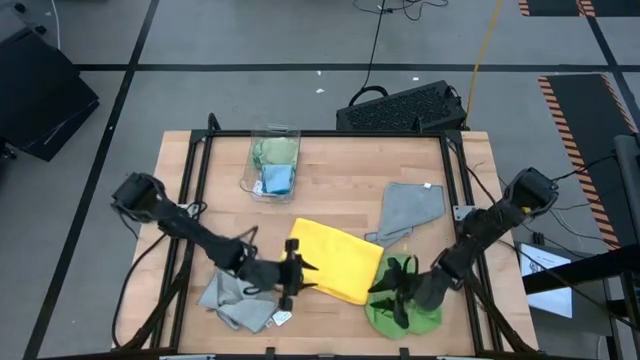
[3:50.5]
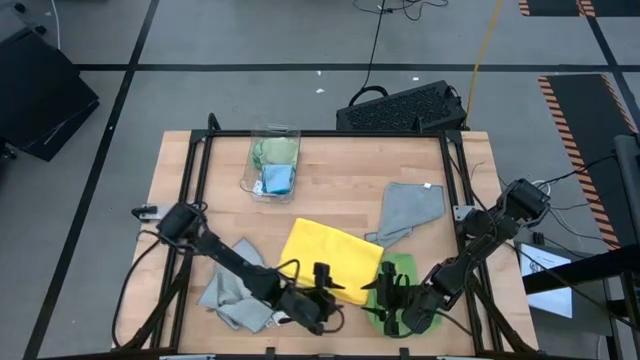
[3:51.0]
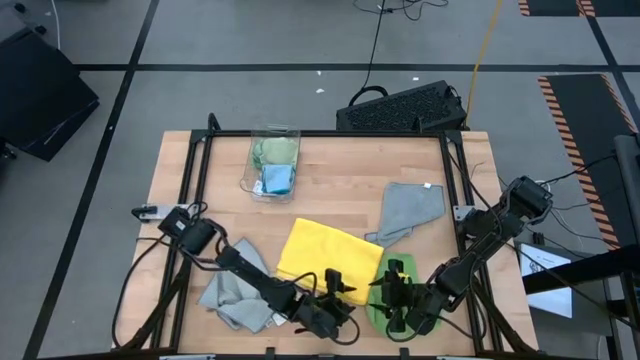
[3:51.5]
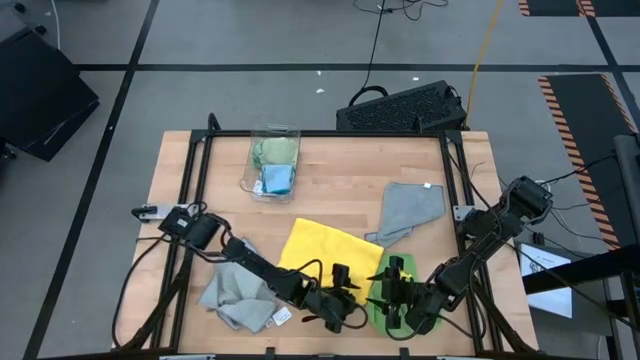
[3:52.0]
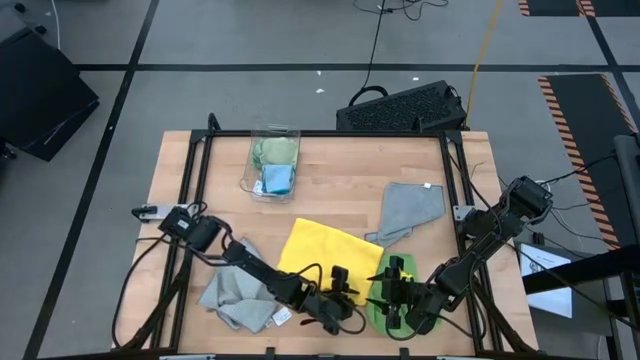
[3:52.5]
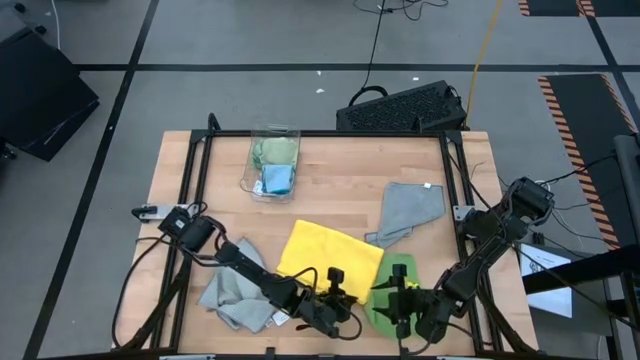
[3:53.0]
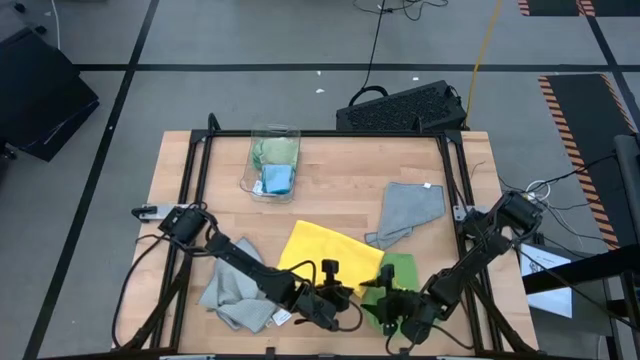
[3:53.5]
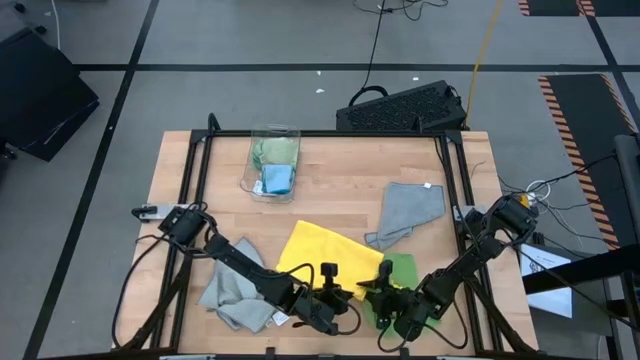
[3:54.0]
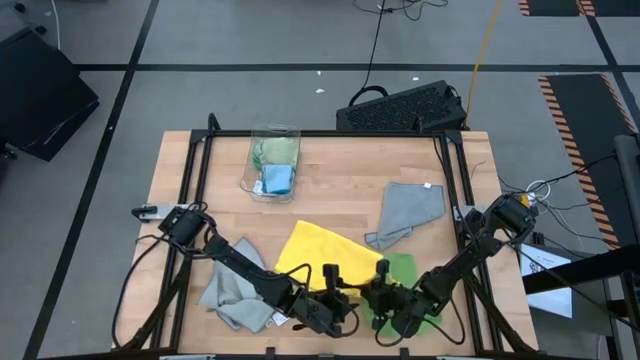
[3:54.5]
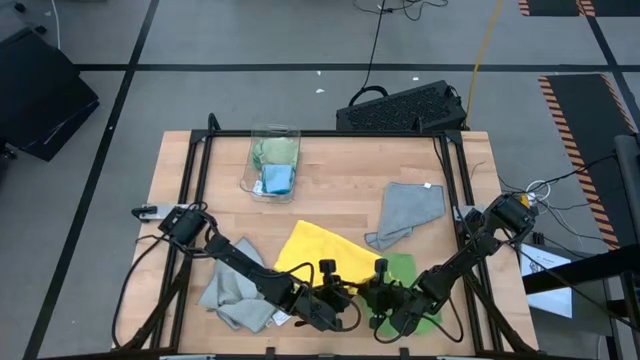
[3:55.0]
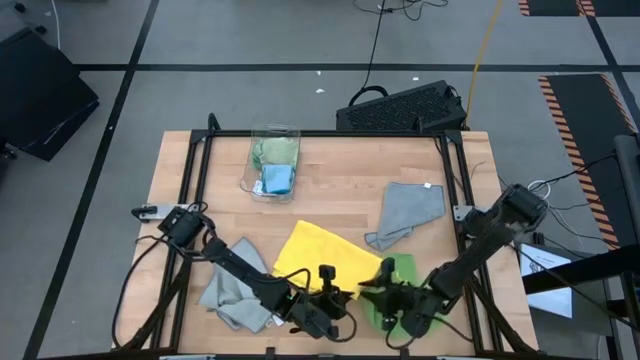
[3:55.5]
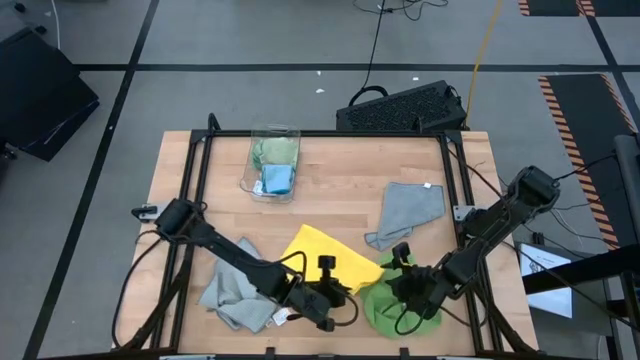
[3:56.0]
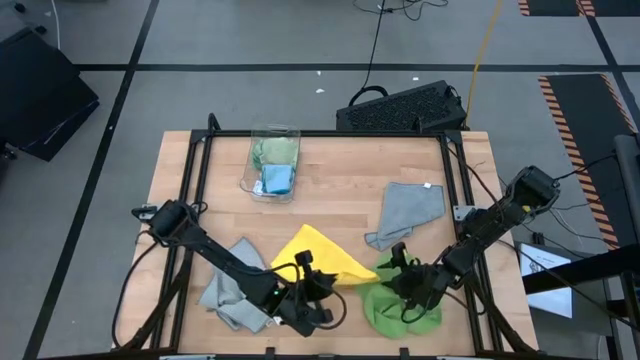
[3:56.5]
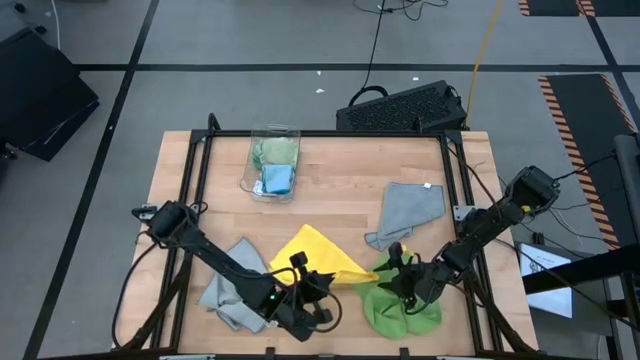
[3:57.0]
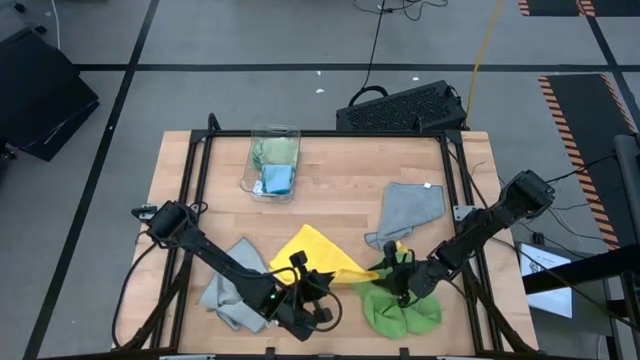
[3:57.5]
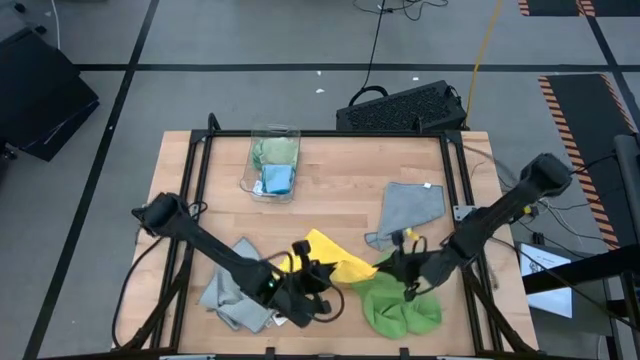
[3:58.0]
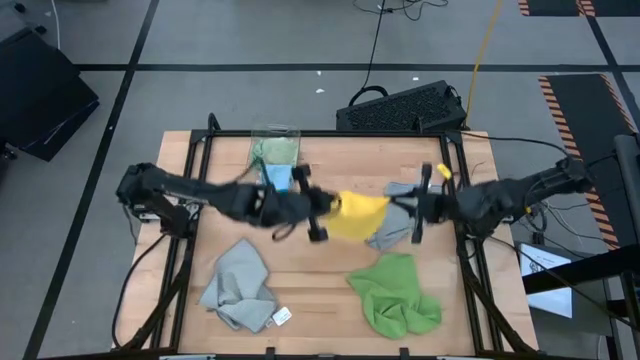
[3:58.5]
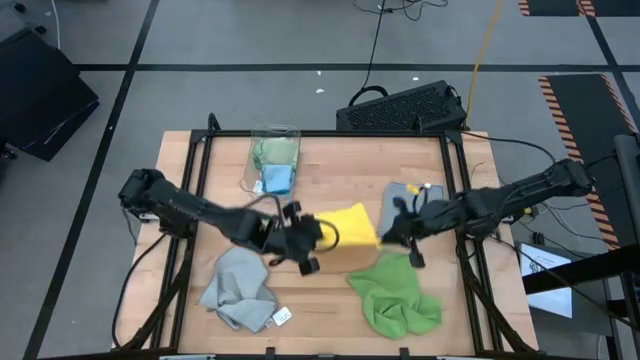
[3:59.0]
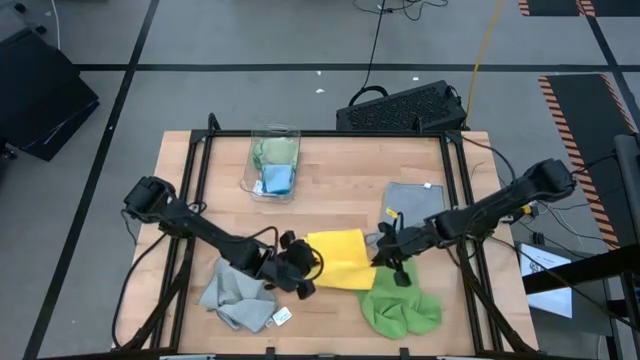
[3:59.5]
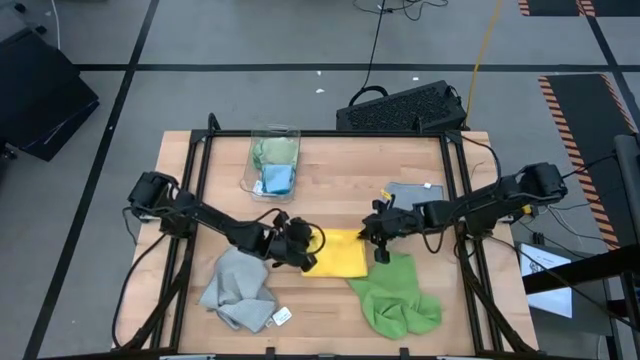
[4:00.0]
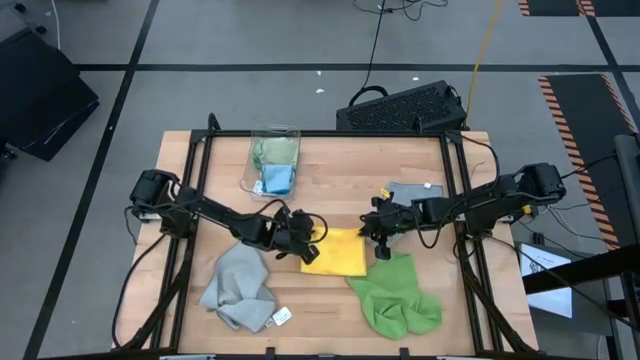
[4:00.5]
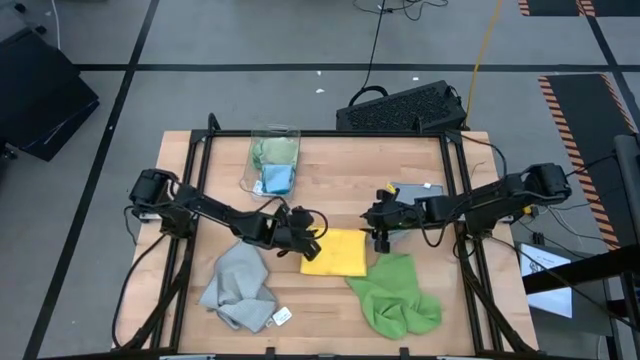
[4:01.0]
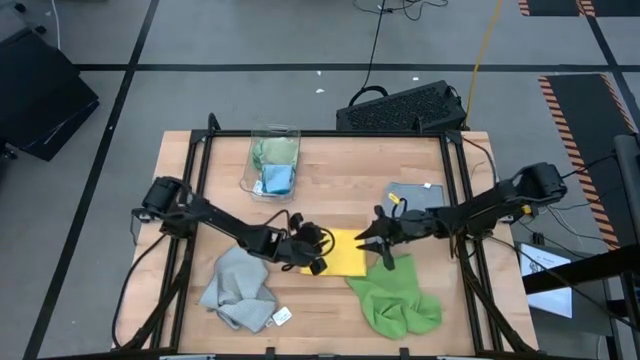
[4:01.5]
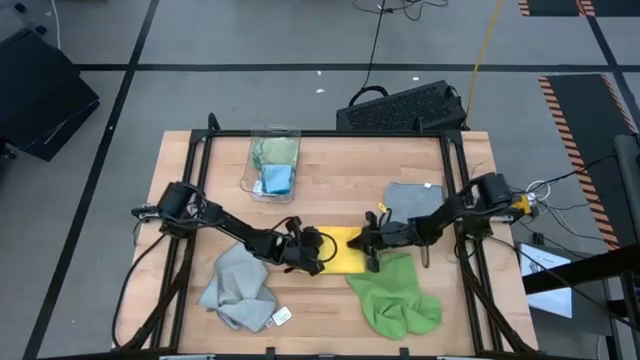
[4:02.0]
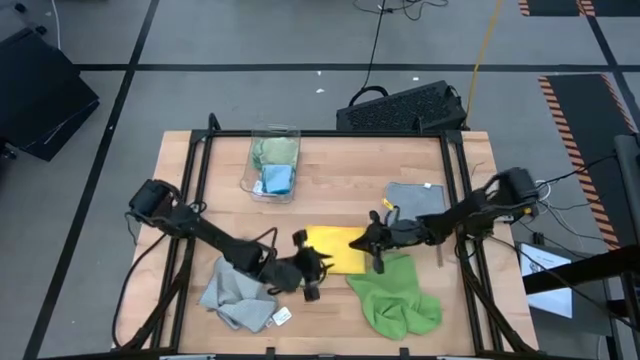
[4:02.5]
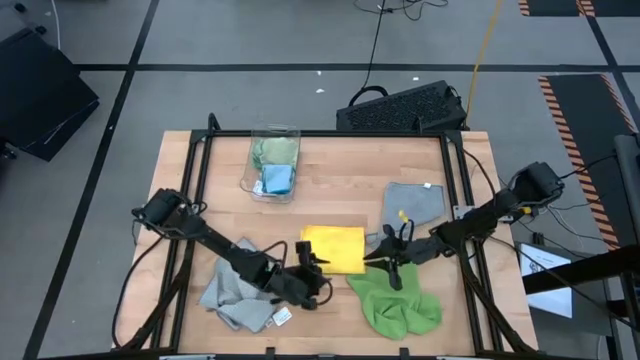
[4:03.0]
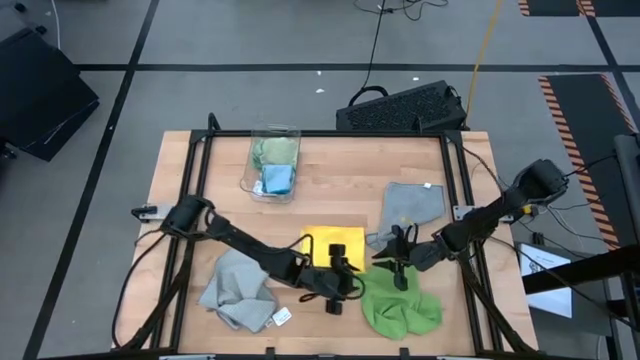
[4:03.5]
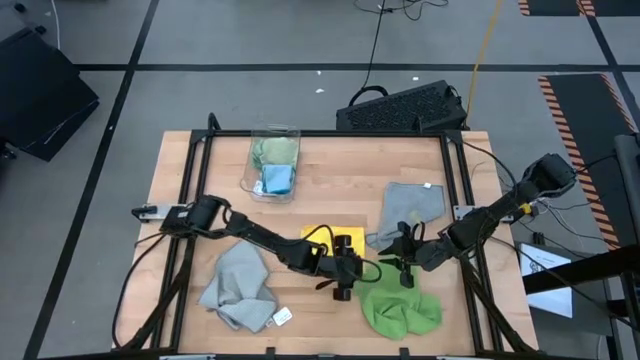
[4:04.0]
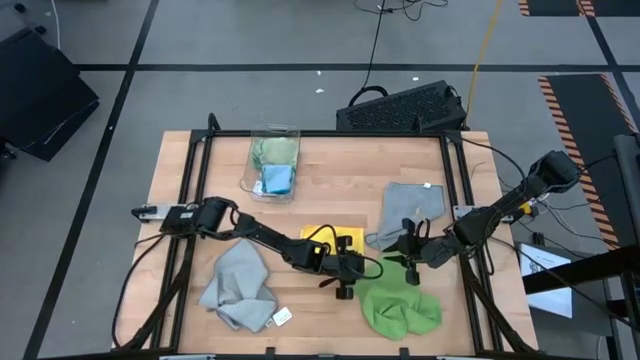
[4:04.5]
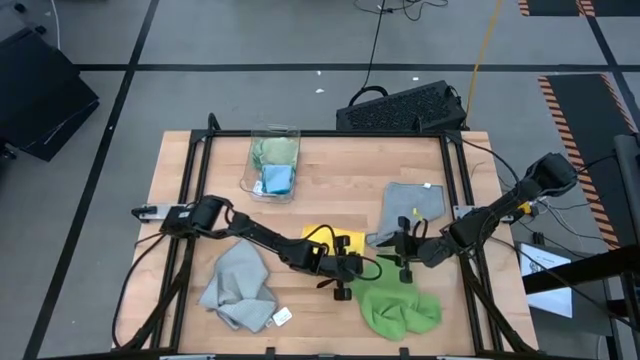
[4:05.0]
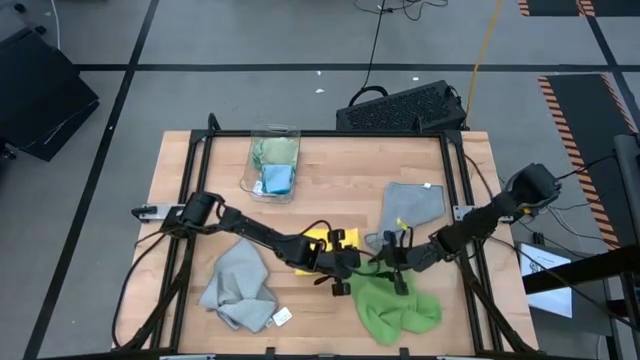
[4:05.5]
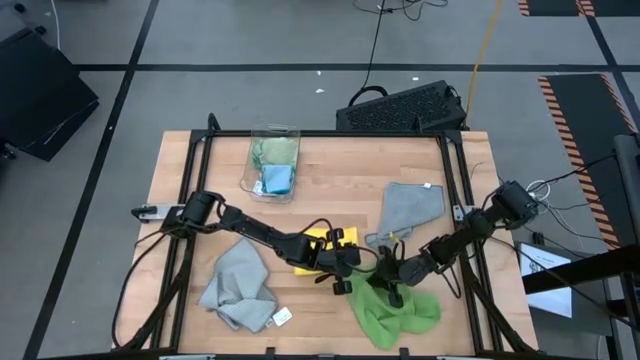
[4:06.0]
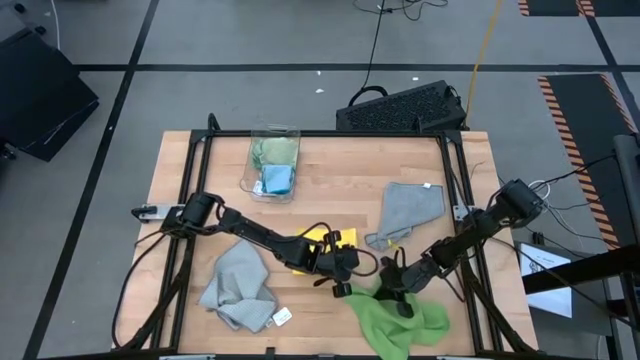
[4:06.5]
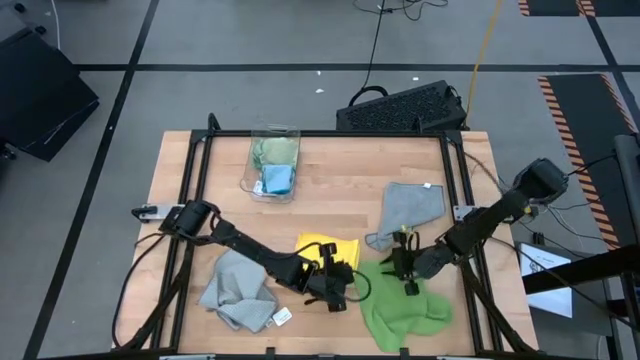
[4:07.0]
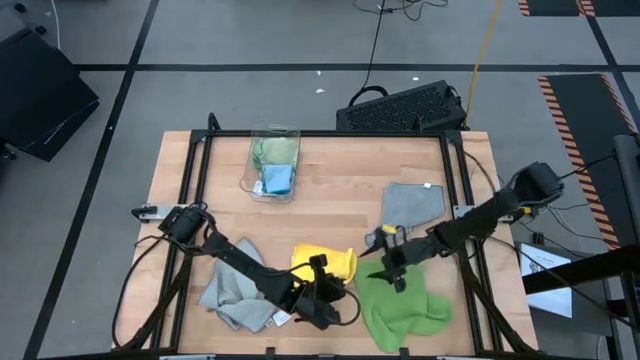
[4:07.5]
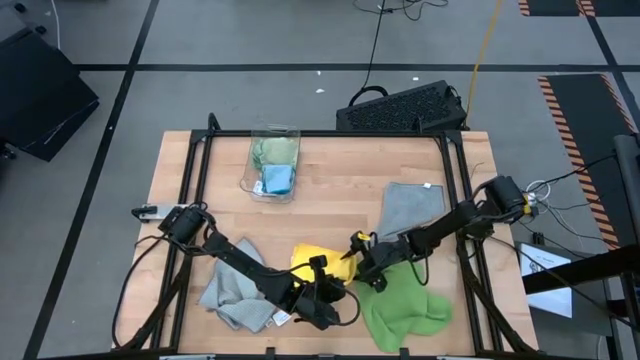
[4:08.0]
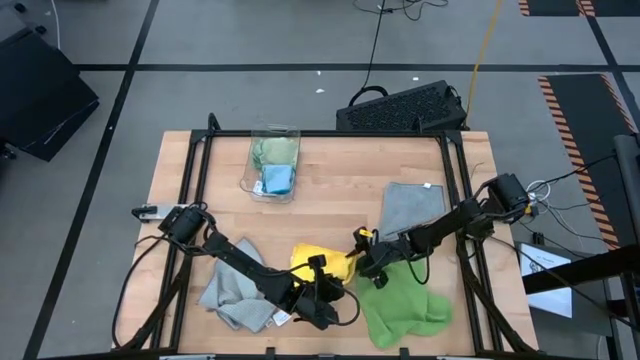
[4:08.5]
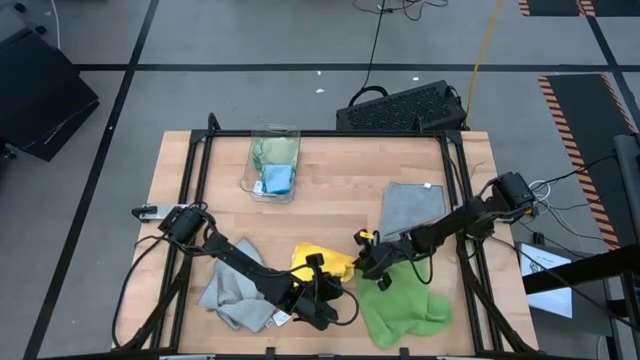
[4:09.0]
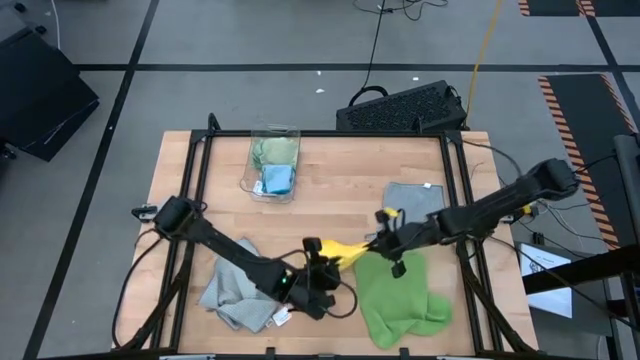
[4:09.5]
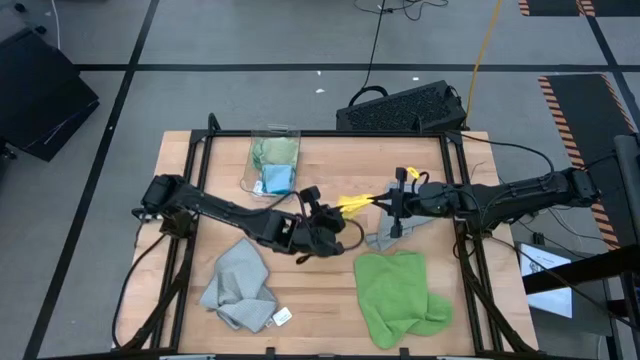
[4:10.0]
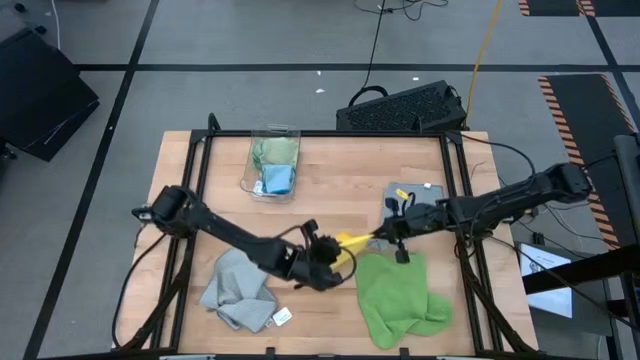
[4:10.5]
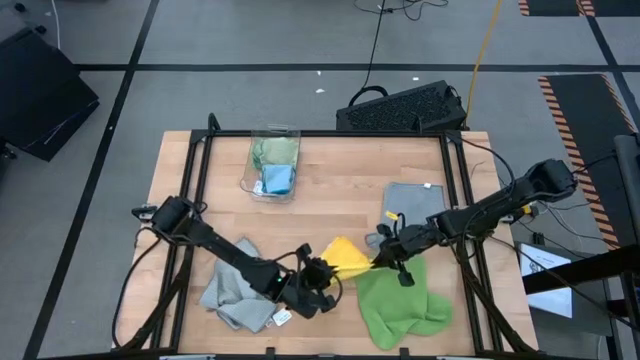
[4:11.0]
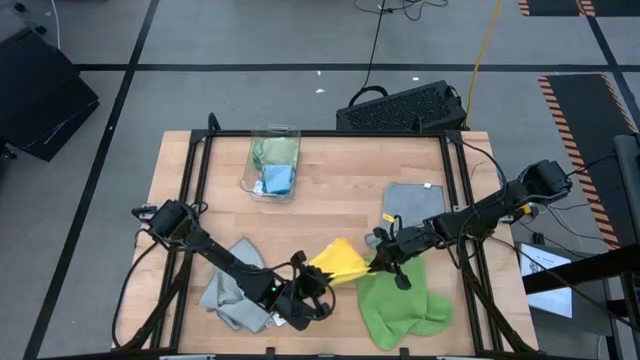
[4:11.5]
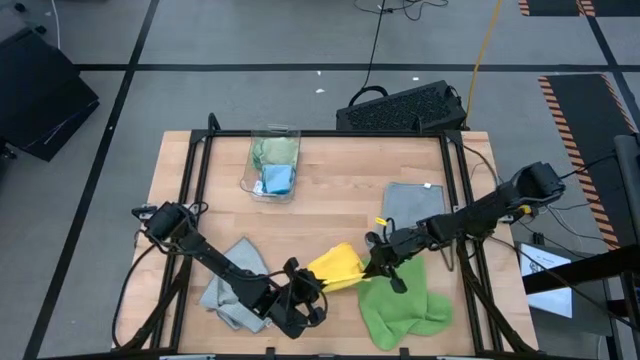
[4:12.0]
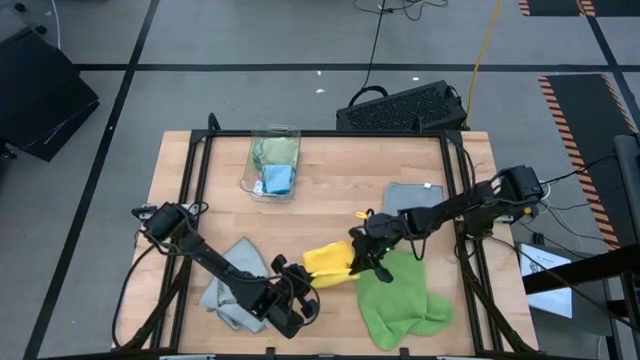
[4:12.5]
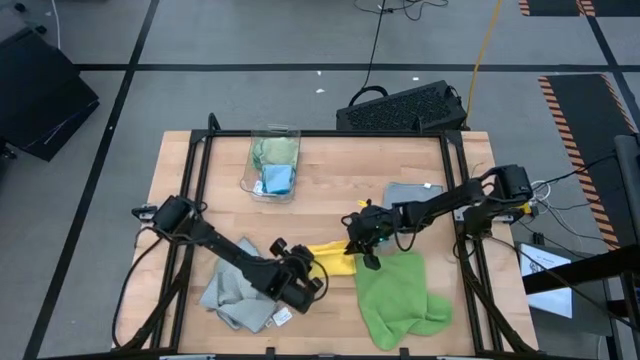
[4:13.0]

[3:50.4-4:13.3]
Task: Fold microfiber towels
Fold the yellow microfiber cloth
